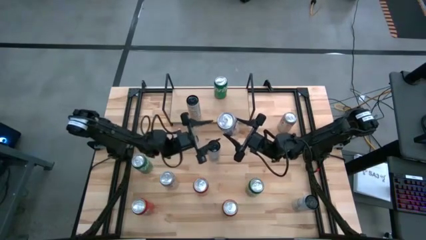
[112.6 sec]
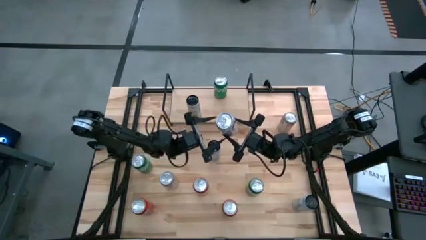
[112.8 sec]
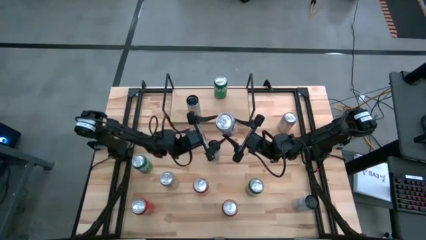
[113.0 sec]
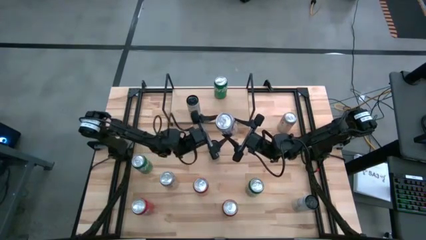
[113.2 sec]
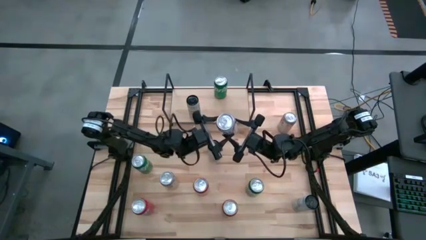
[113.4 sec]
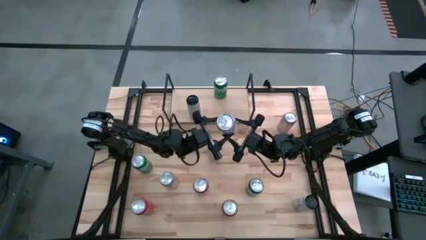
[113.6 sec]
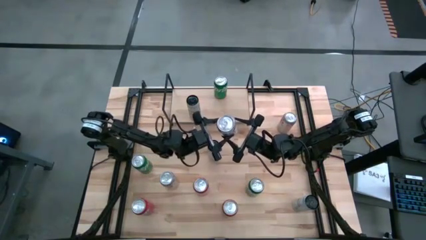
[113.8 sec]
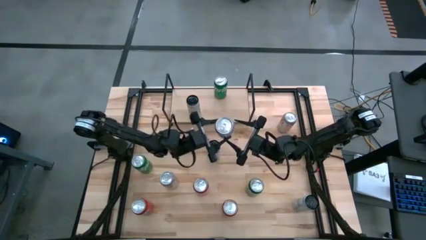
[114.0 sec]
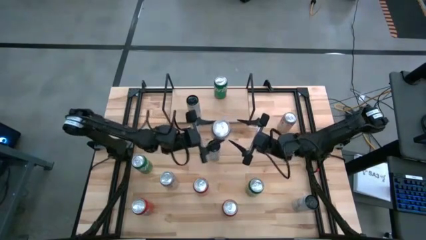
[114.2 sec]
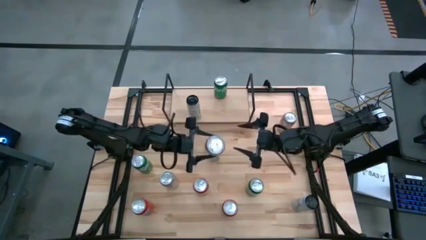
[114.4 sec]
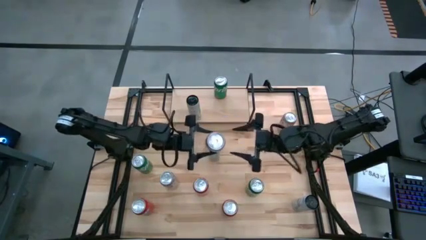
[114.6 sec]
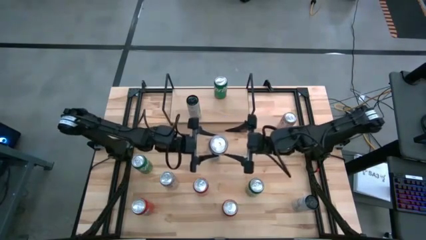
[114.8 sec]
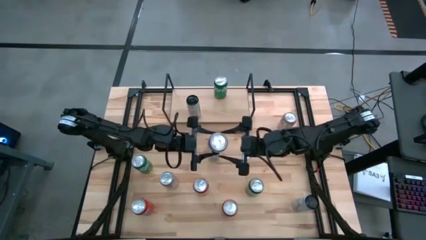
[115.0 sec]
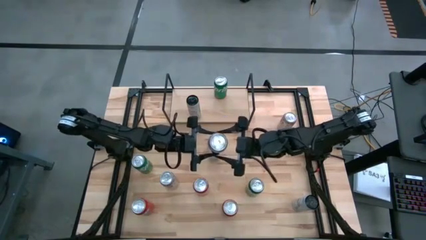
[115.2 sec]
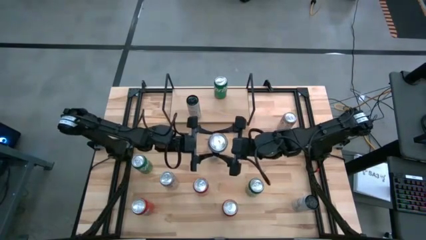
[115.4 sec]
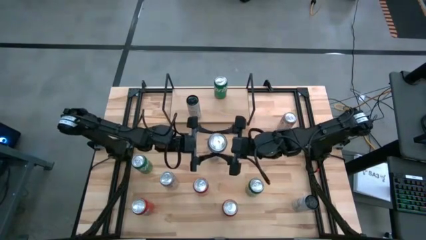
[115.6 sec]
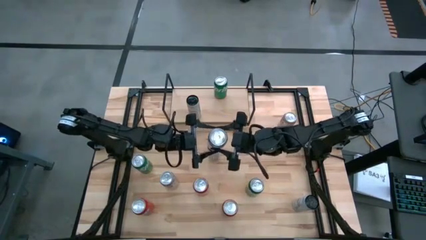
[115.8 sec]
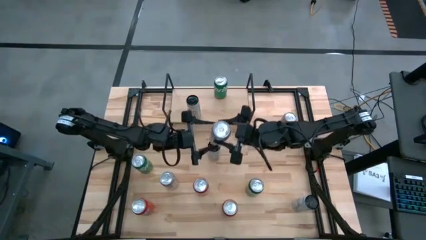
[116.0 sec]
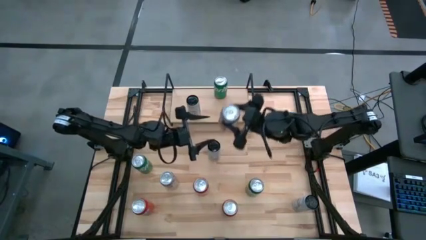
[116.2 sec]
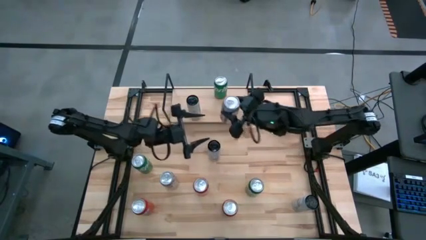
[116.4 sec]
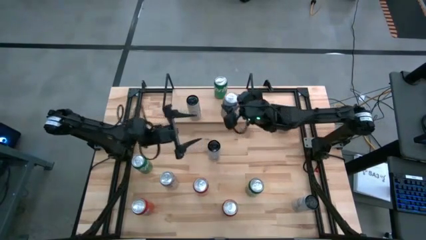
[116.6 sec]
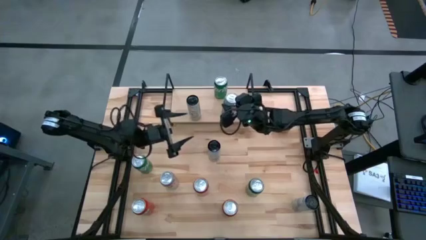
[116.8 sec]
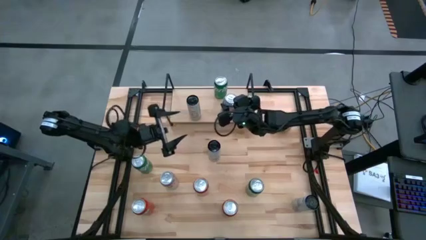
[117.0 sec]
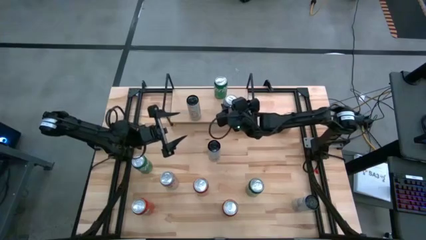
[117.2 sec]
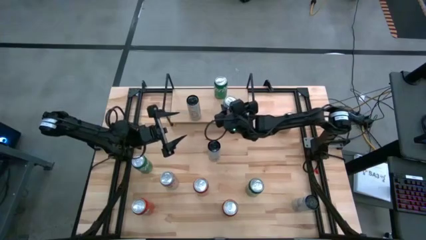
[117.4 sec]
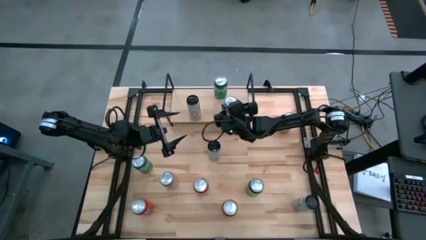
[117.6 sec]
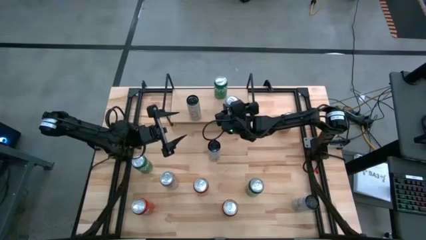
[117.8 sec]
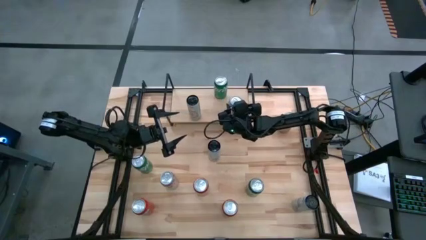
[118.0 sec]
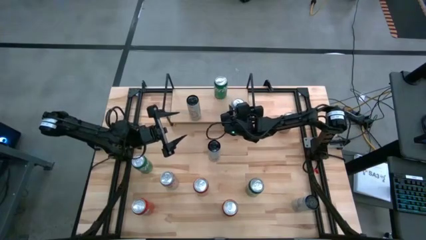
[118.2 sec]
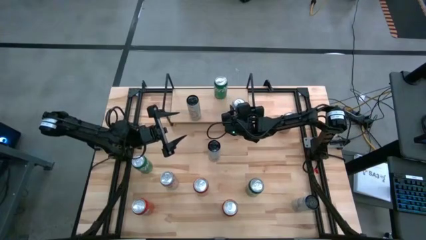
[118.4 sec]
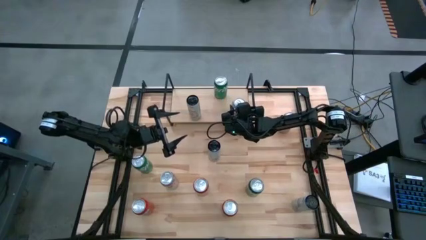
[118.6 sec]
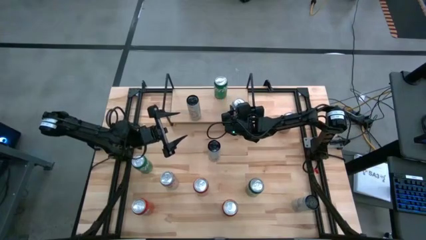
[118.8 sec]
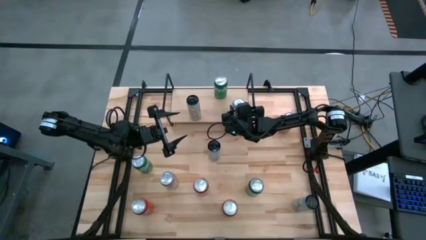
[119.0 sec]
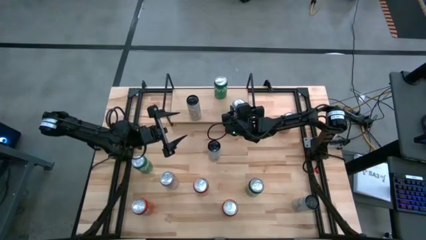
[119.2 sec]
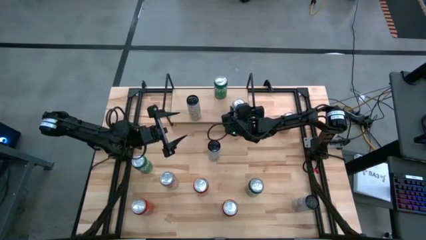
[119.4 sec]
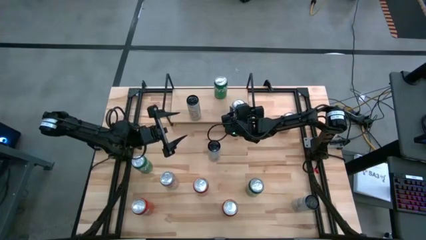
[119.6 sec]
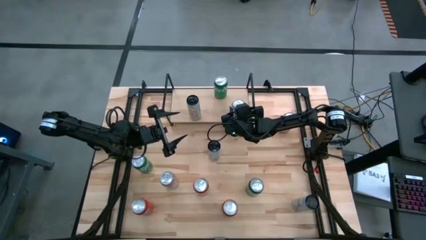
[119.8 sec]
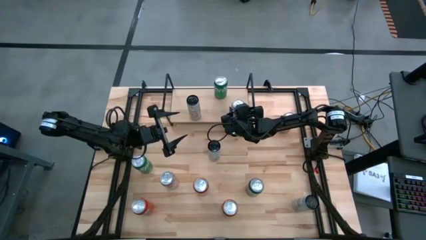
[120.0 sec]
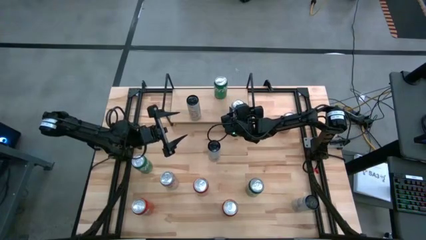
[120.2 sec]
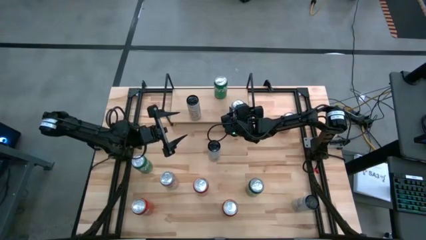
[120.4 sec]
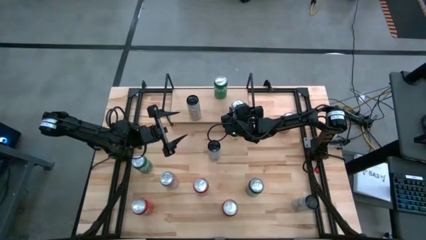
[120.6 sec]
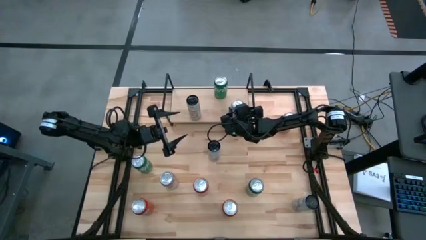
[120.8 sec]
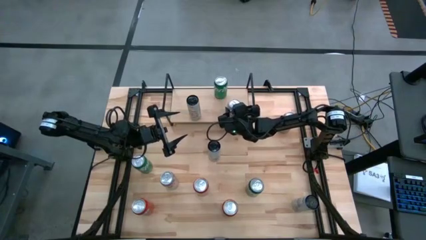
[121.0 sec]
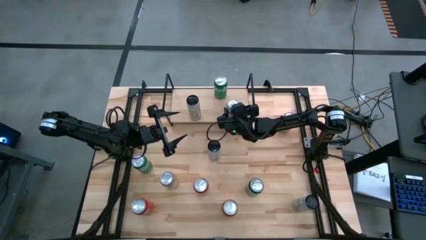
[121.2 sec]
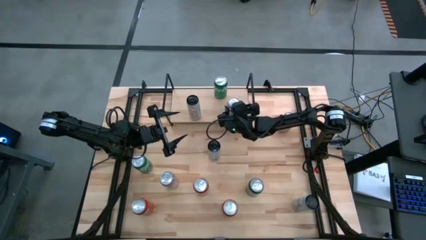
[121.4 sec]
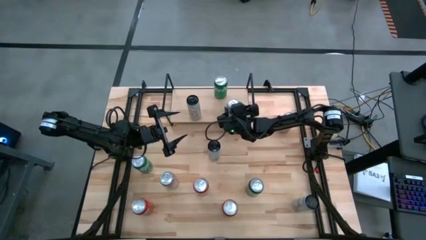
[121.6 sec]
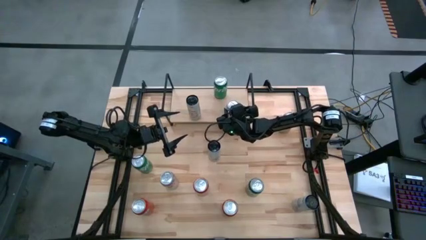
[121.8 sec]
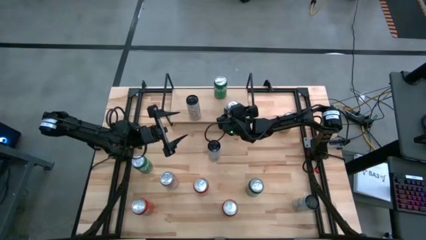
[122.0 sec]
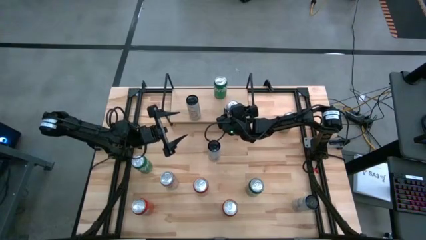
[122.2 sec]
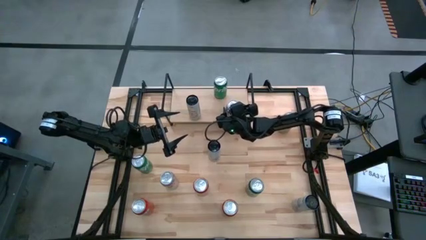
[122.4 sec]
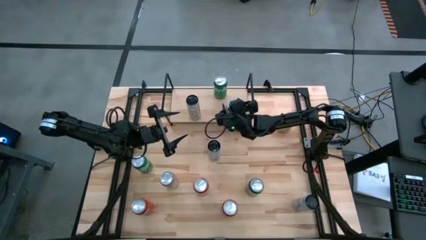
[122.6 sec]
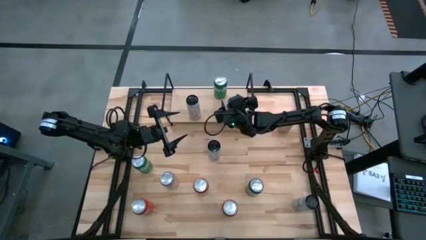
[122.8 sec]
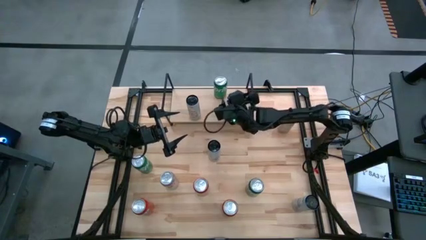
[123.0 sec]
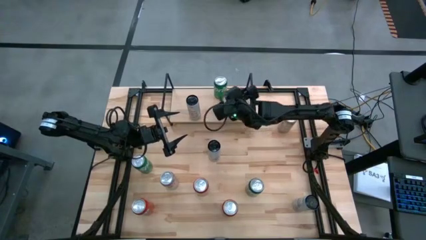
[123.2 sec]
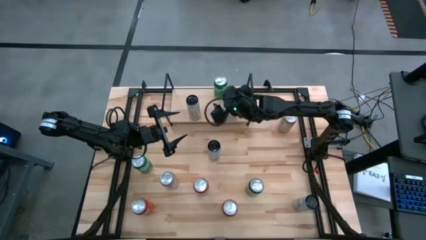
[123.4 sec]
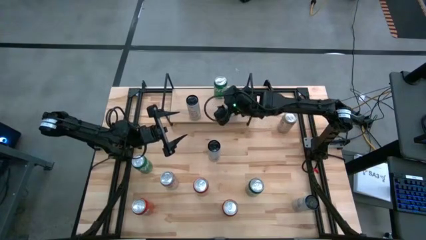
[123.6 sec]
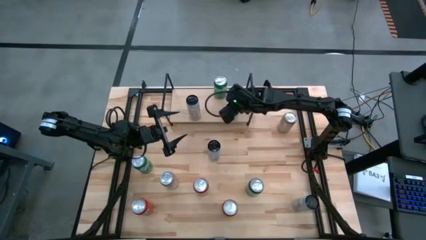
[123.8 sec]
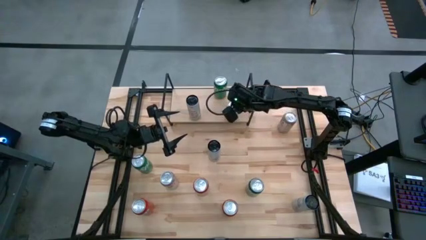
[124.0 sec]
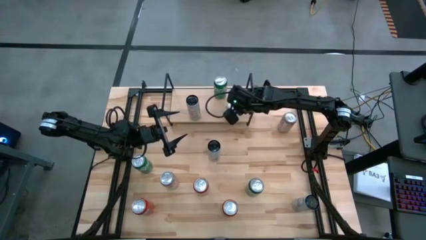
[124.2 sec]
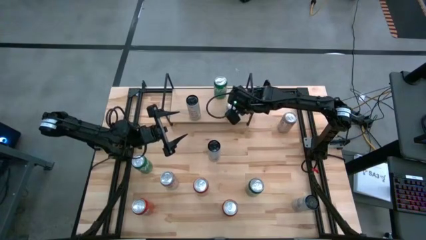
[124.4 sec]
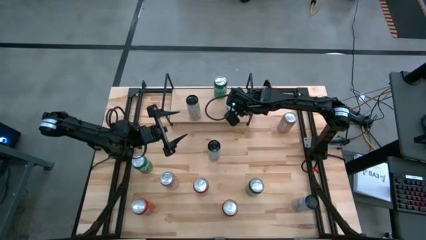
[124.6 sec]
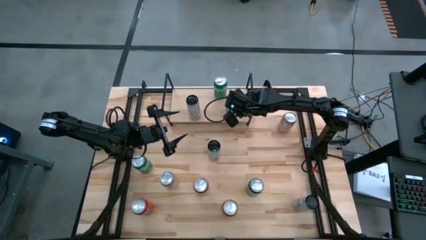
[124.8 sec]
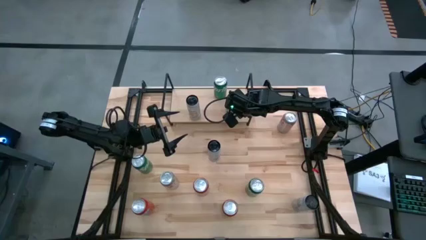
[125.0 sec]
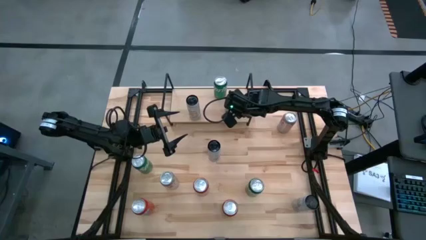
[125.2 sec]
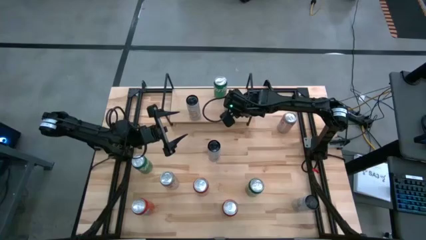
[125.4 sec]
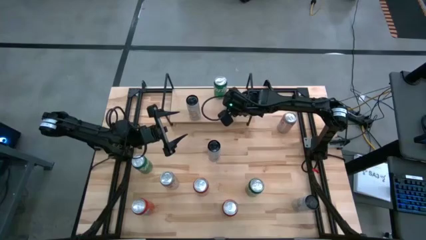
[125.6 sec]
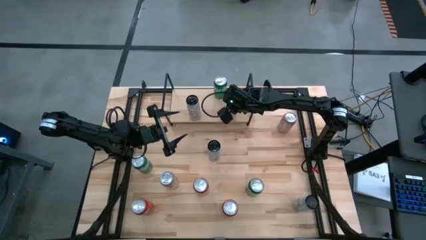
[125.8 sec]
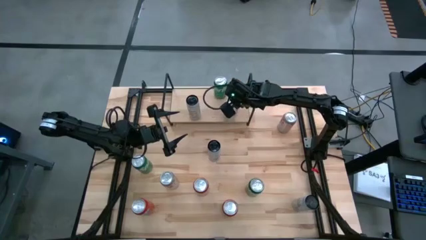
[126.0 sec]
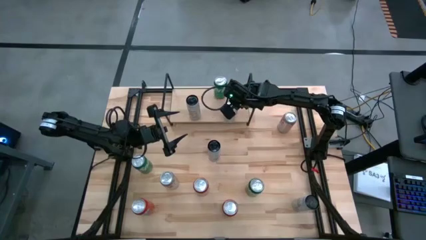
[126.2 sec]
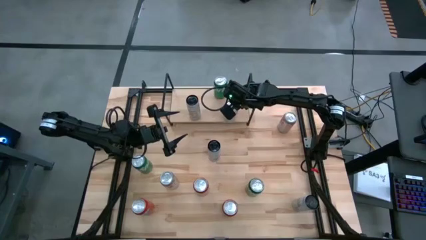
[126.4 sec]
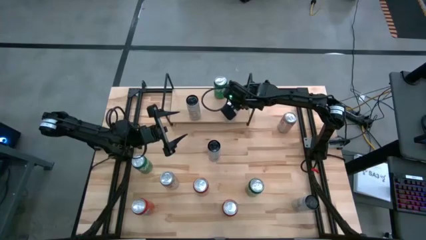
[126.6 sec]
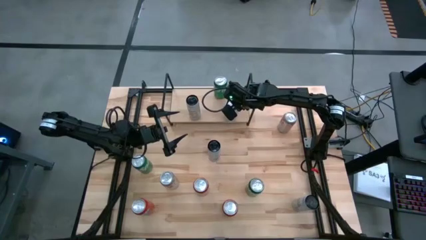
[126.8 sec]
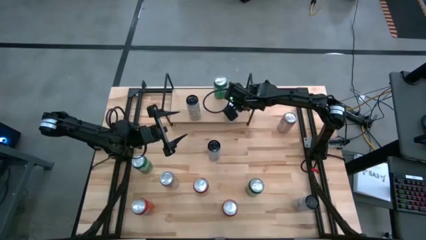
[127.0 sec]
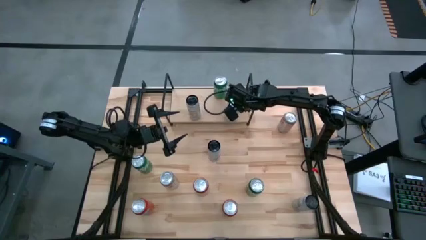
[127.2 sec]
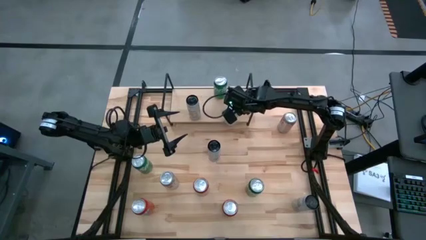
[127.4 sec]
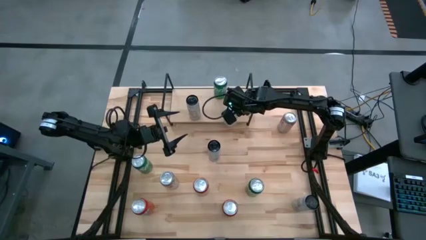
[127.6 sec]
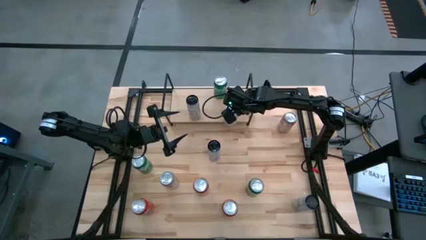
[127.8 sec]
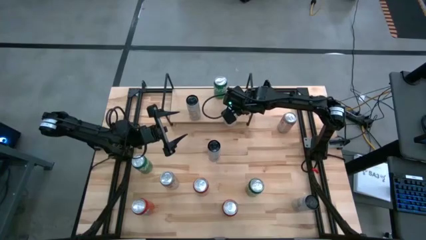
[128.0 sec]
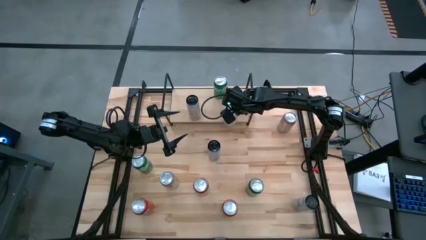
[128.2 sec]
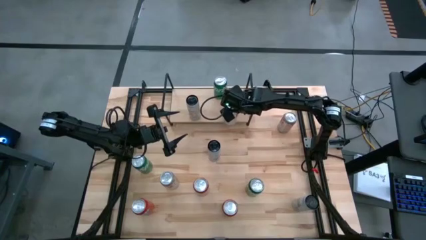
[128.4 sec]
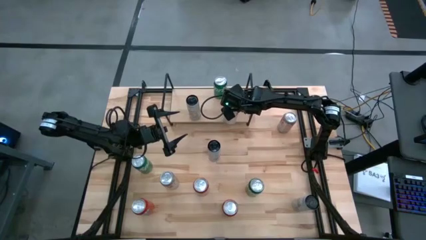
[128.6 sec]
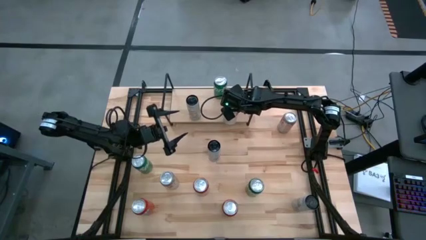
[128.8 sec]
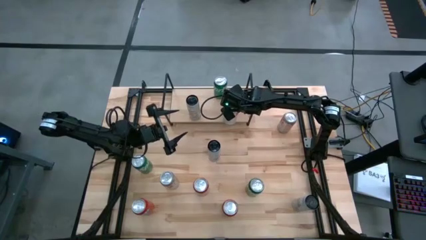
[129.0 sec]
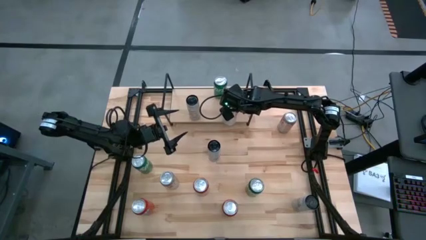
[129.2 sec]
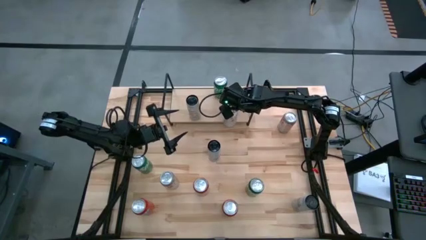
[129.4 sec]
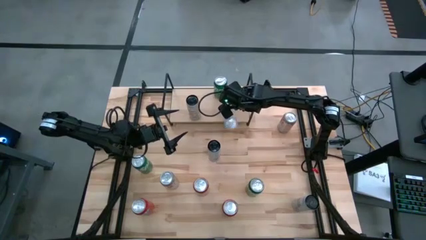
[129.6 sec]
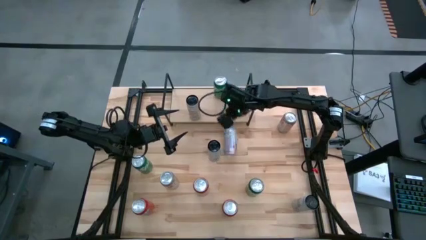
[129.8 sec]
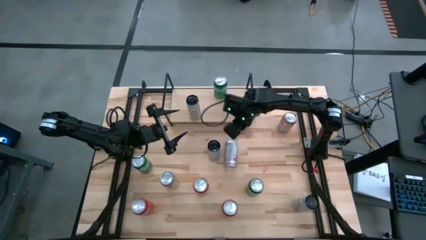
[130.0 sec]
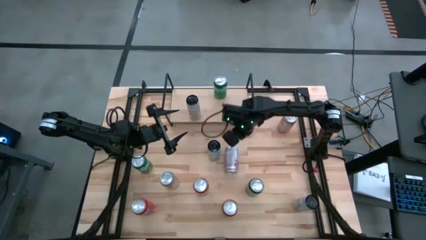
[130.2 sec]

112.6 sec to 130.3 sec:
Task: Sort soda cans
Put the middle red silver soda can on the shelf
